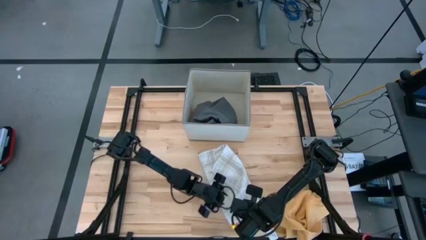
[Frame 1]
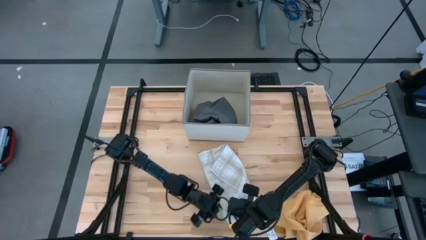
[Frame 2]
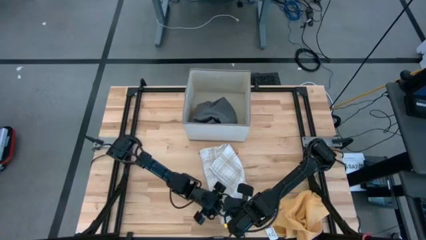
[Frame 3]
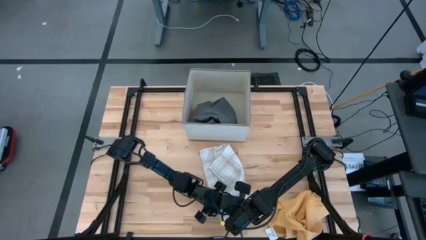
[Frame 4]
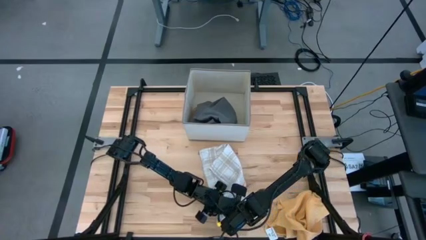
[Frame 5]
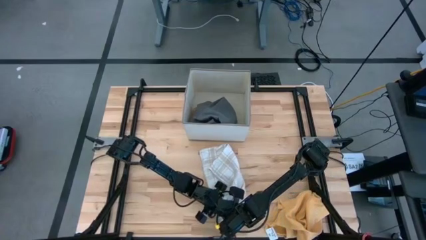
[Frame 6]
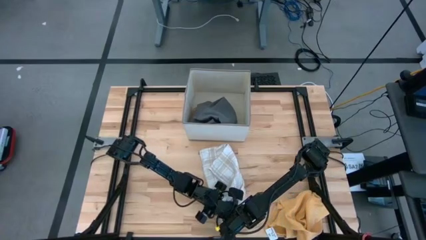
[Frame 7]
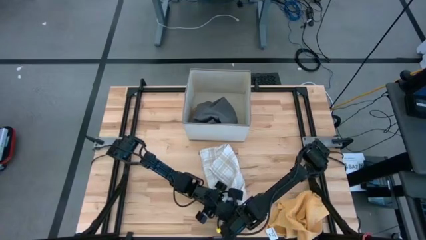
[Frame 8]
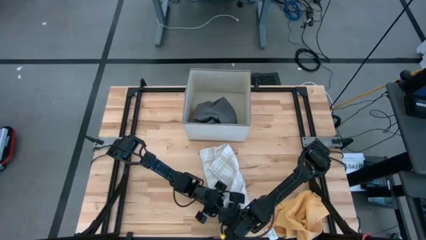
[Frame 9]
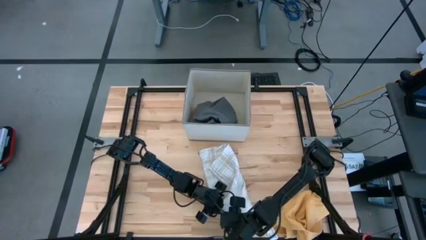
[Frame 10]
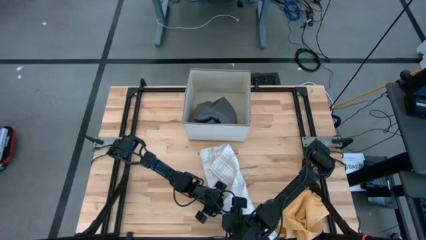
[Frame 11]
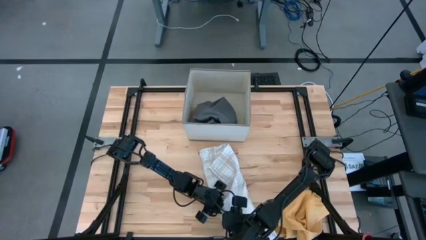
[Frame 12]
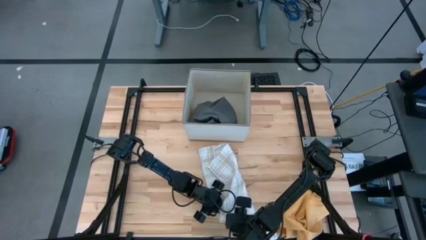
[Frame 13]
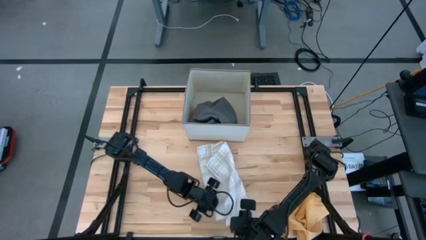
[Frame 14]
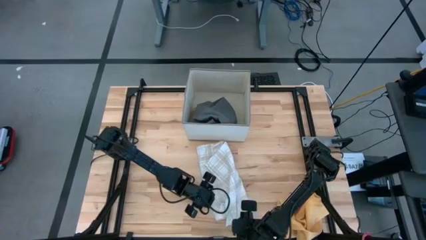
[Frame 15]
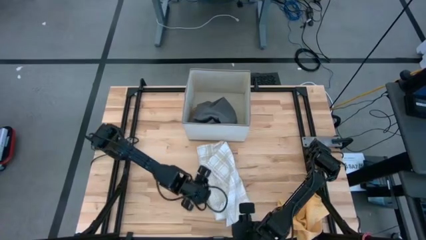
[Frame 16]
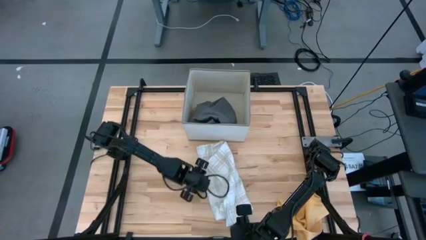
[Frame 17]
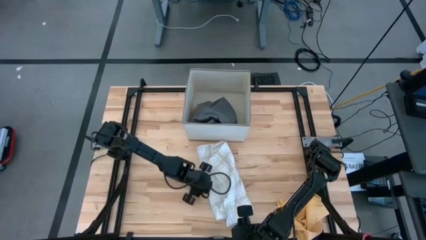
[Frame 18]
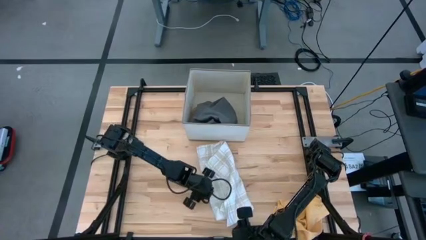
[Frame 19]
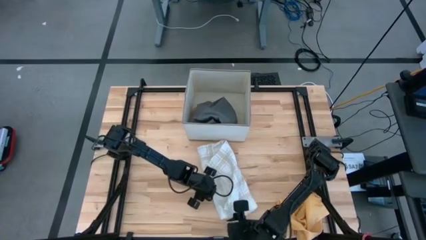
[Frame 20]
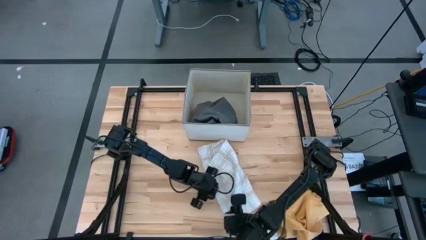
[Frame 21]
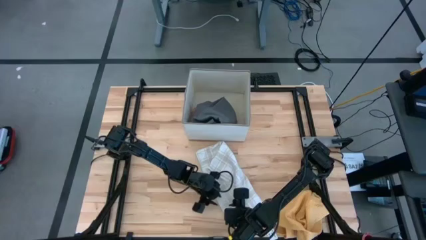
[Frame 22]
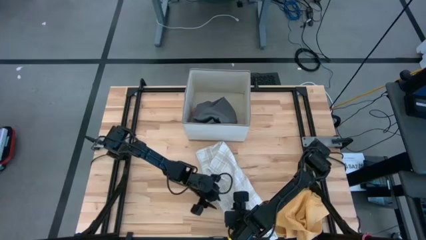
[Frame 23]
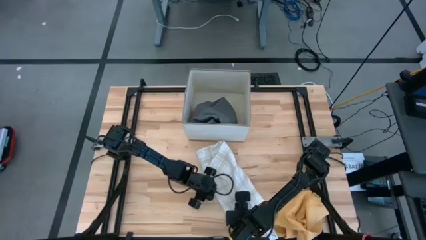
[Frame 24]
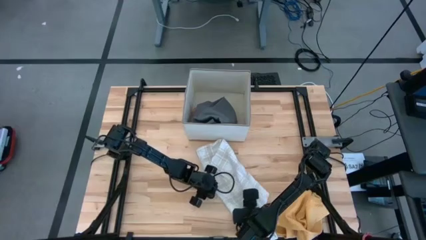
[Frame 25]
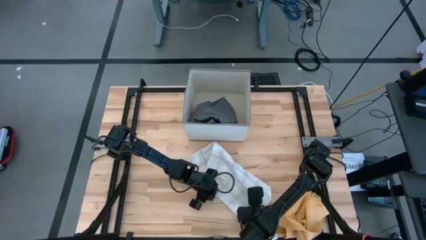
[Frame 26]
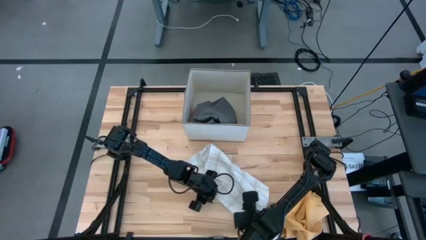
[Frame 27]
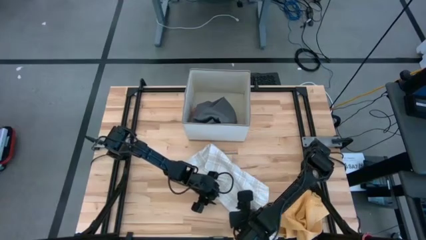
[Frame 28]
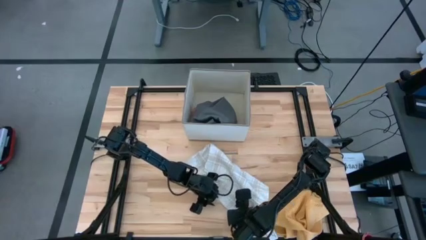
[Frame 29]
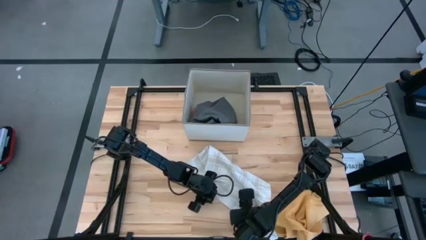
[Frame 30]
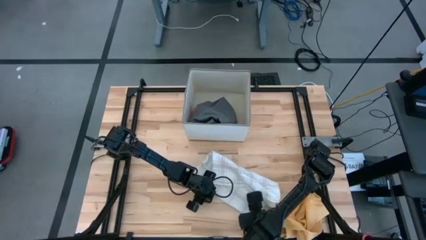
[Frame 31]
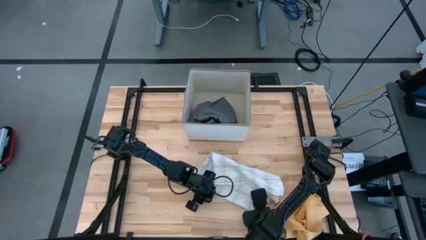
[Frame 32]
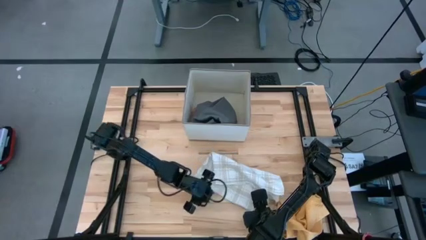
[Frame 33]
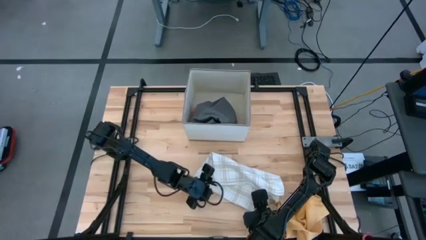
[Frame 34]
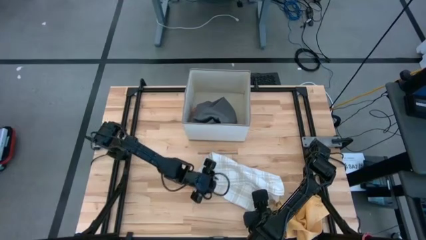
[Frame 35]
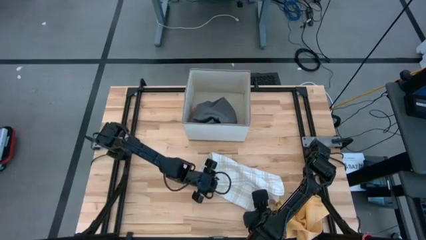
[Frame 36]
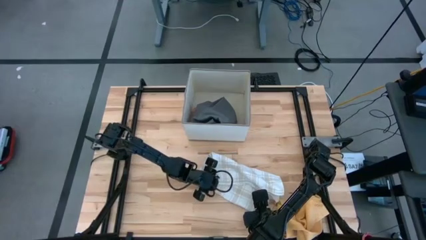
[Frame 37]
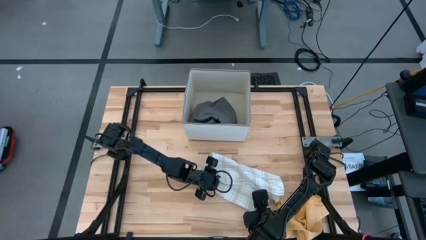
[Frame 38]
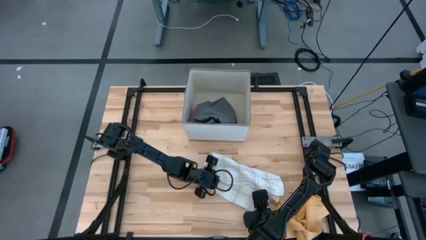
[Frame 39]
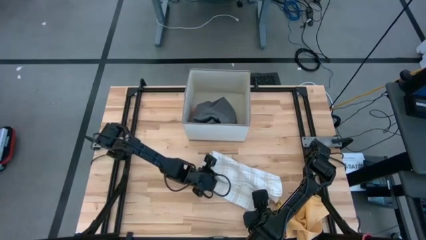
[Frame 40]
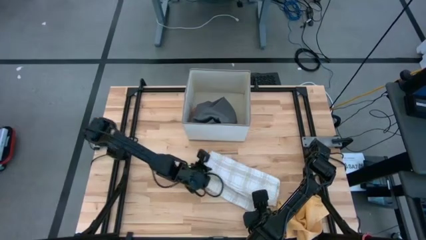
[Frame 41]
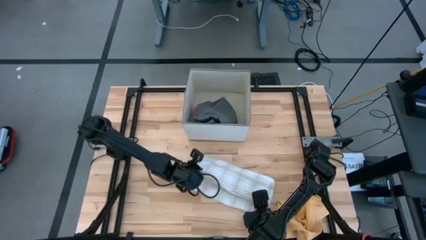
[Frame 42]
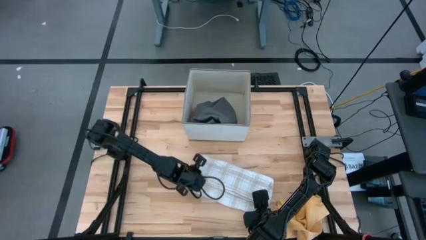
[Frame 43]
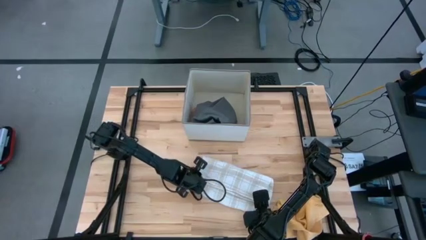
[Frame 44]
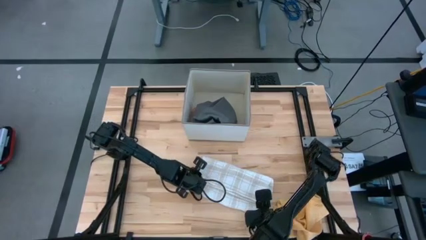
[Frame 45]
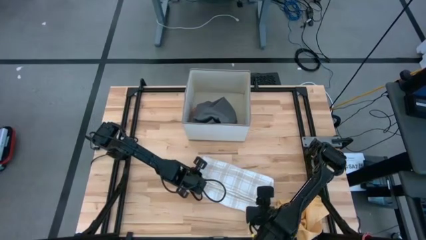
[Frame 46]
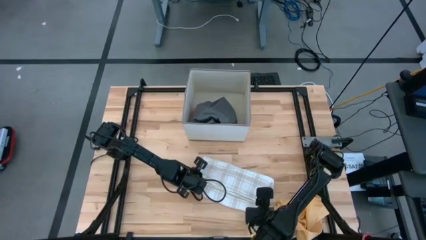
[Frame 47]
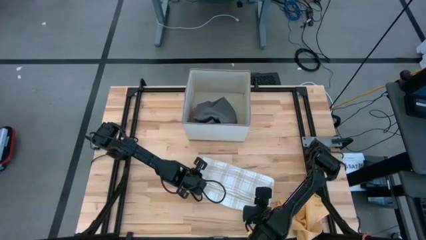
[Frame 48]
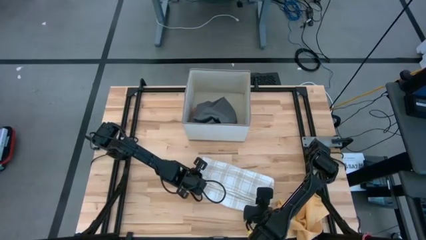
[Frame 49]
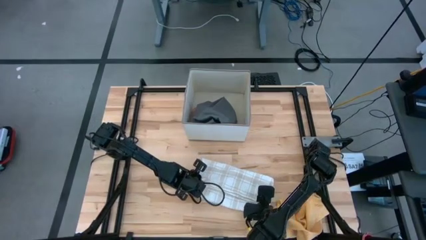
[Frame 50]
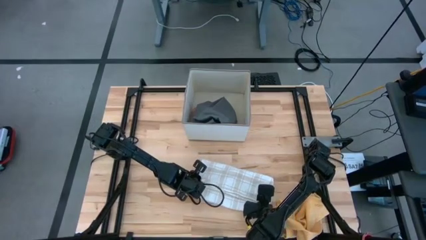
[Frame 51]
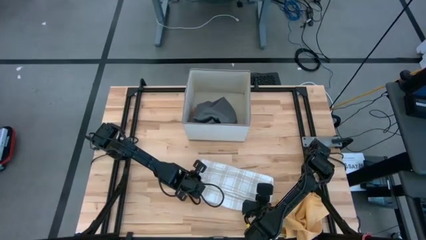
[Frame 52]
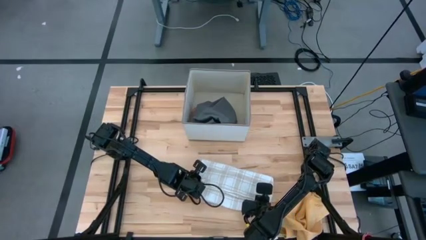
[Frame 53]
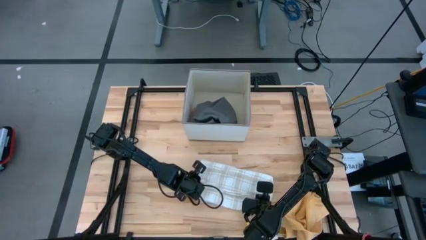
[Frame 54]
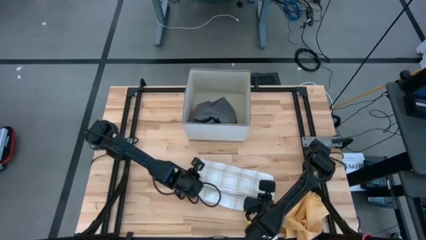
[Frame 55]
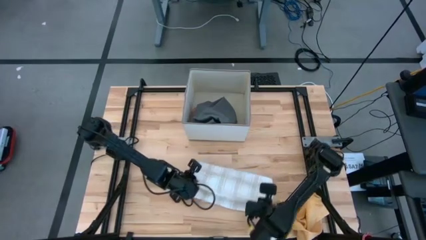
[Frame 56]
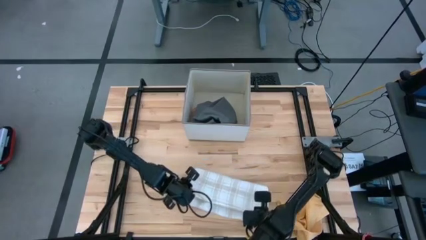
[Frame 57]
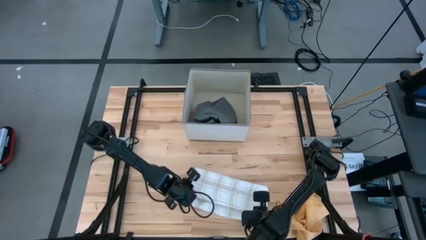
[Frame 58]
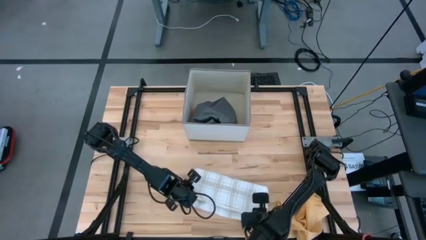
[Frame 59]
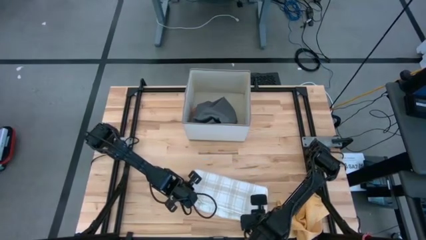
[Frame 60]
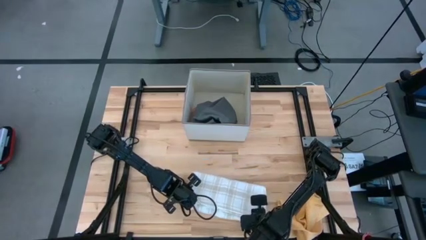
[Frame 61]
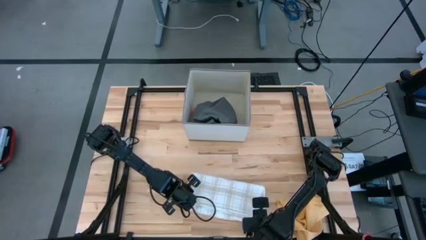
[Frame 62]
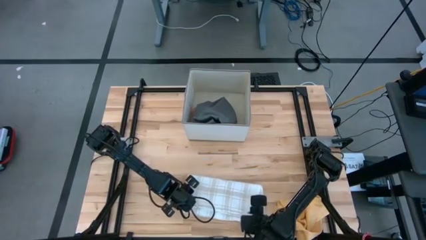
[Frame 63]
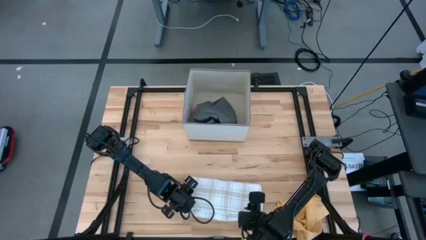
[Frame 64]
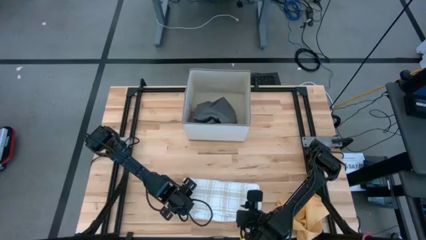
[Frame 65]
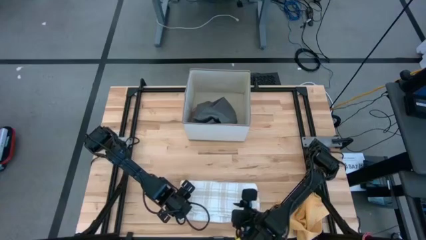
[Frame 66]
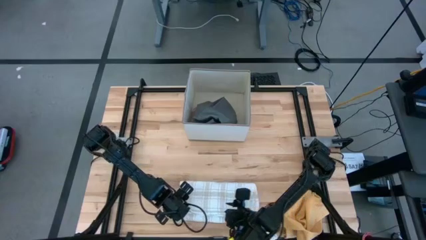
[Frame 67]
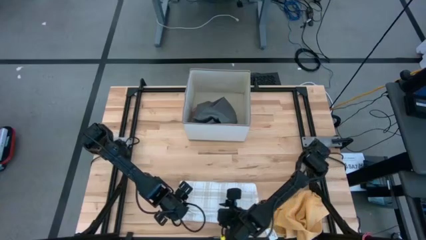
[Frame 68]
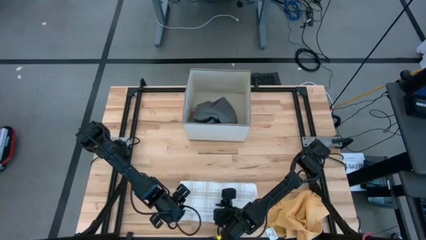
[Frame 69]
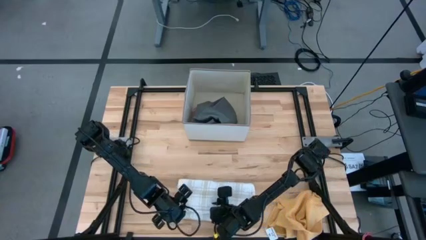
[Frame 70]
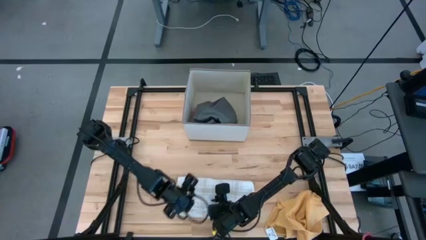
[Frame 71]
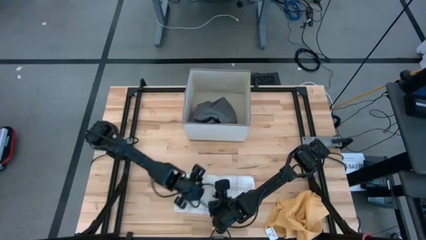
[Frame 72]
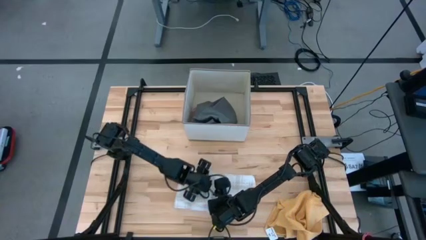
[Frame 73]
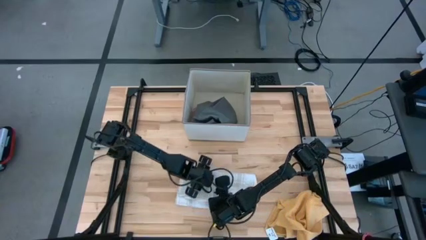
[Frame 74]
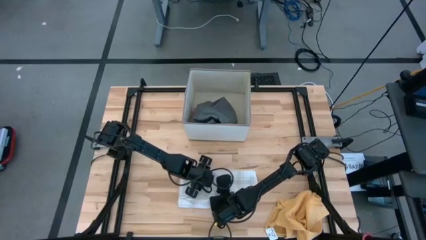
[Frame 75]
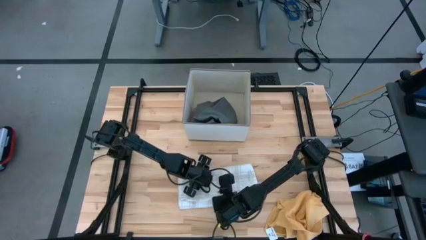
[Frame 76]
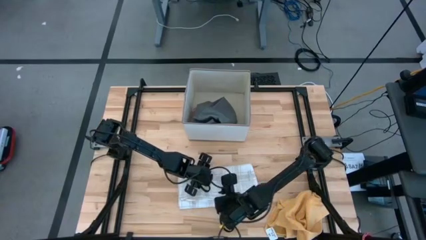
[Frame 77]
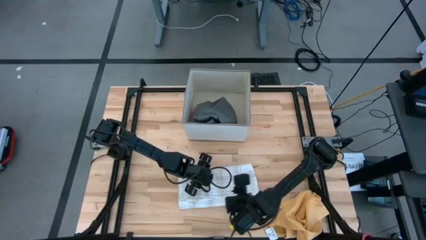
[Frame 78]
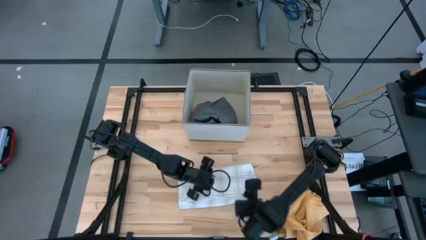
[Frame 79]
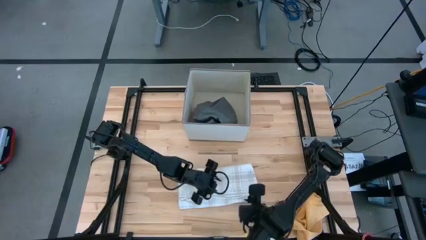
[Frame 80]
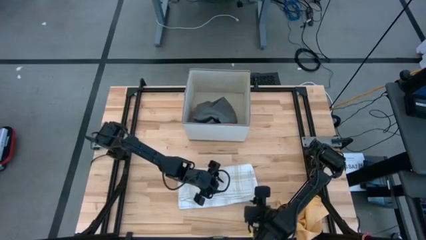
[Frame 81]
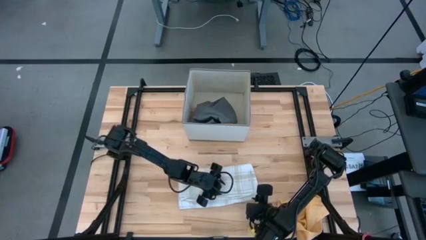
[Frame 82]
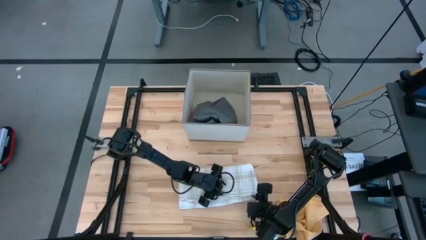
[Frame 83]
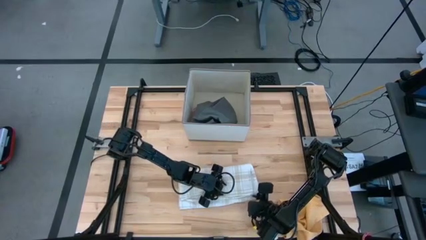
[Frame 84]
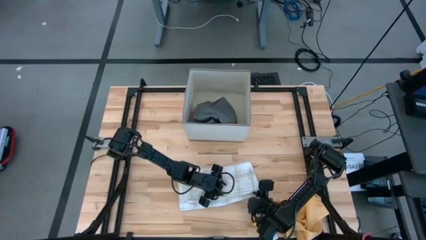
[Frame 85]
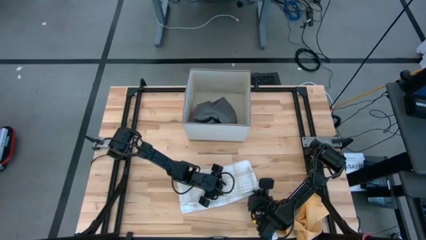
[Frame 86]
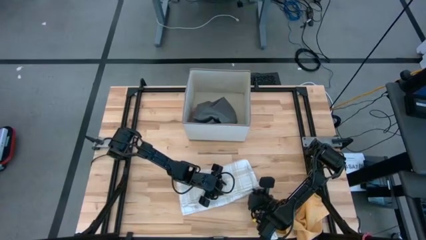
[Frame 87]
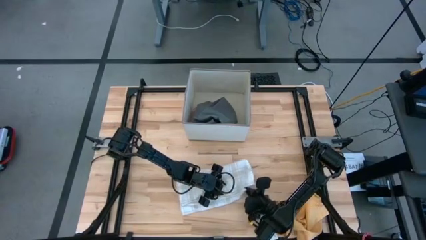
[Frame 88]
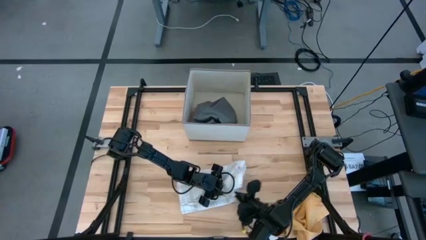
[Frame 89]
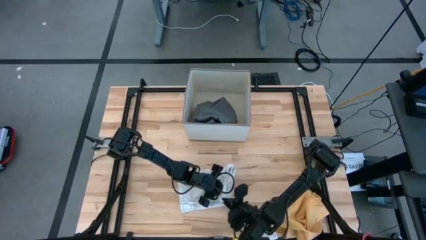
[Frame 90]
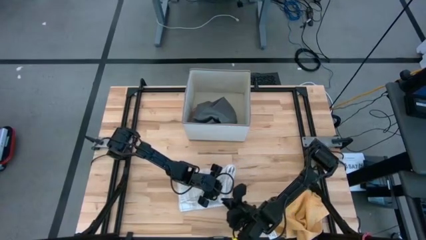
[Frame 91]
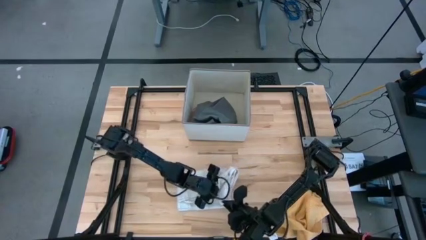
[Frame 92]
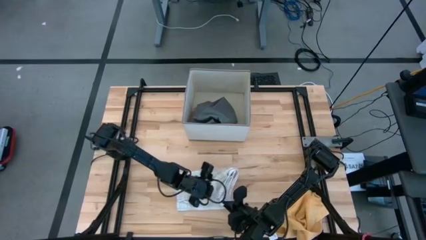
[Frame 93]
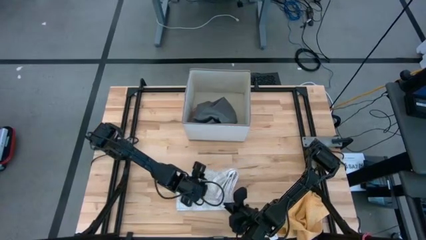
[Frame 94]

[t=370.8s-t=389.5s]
Task: Fold towel
Fold the white patterned towel
